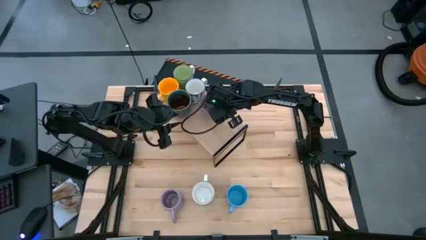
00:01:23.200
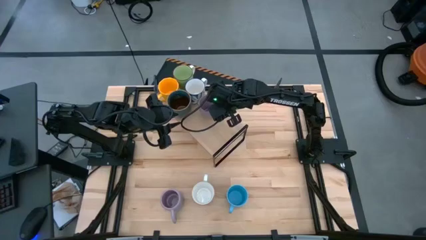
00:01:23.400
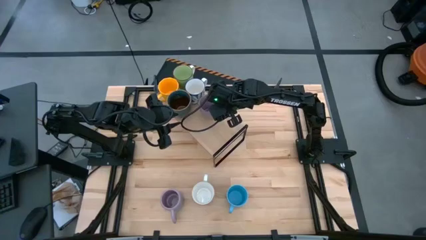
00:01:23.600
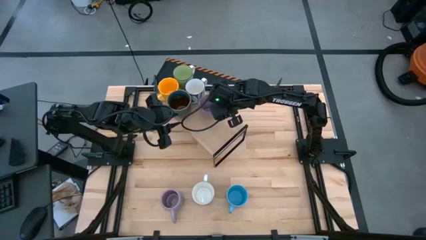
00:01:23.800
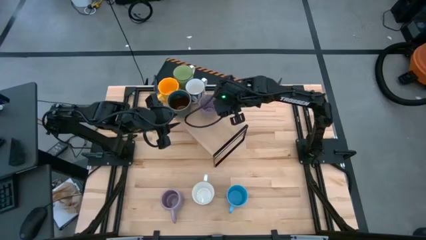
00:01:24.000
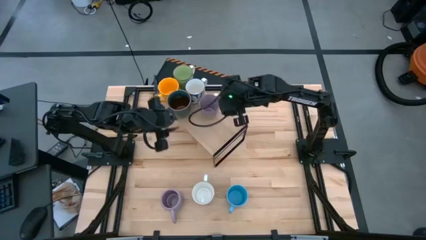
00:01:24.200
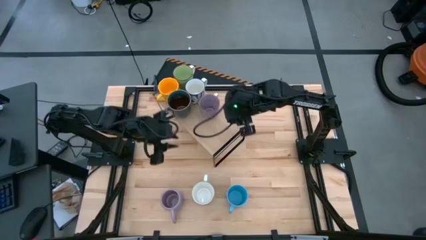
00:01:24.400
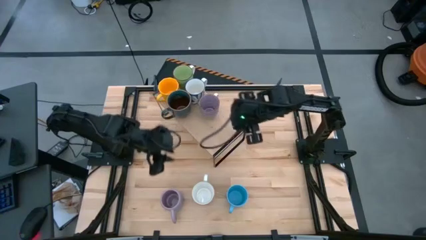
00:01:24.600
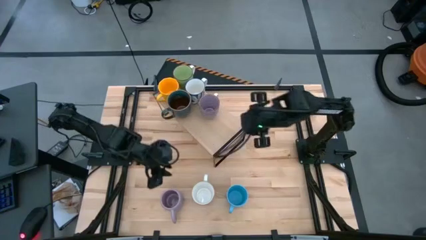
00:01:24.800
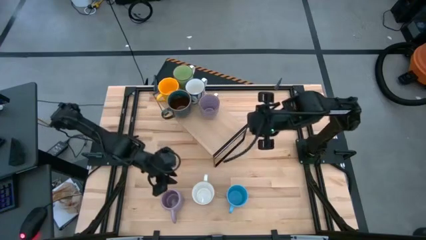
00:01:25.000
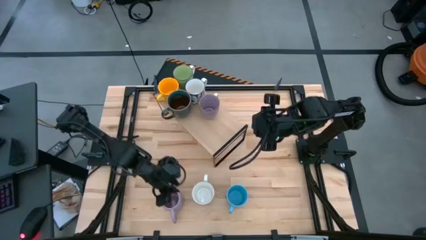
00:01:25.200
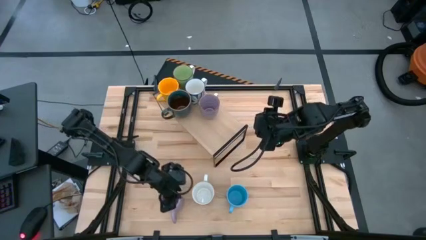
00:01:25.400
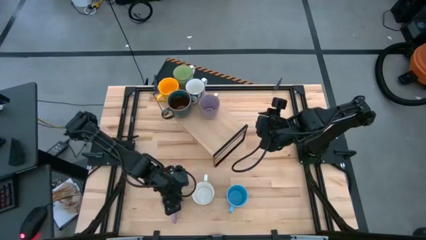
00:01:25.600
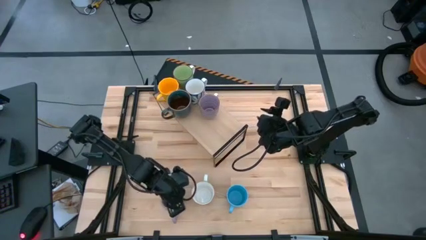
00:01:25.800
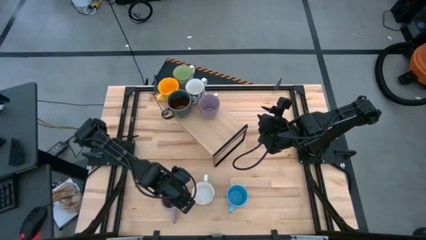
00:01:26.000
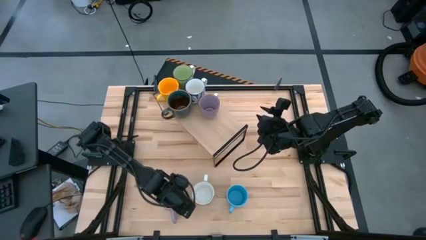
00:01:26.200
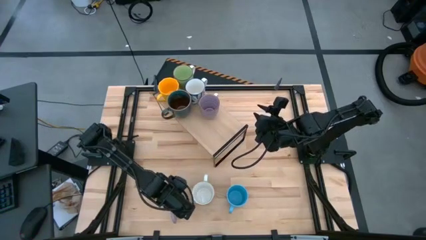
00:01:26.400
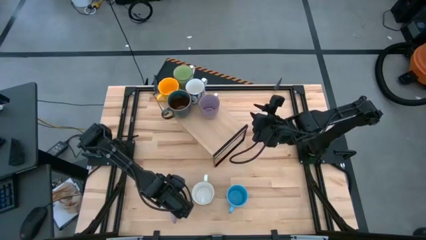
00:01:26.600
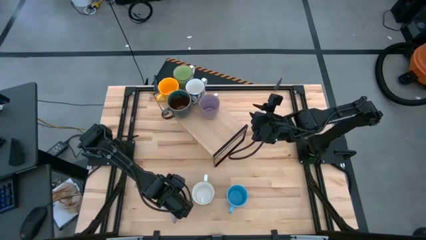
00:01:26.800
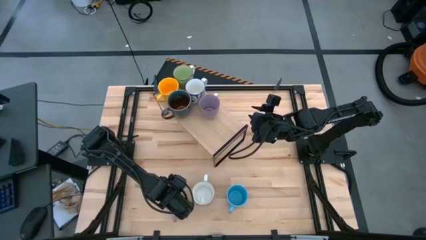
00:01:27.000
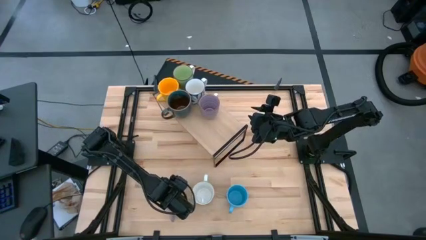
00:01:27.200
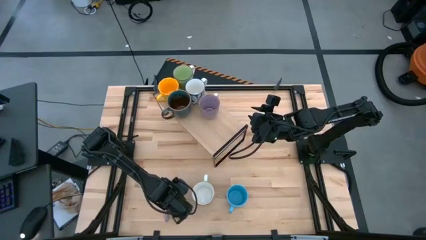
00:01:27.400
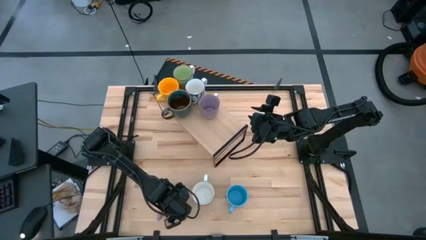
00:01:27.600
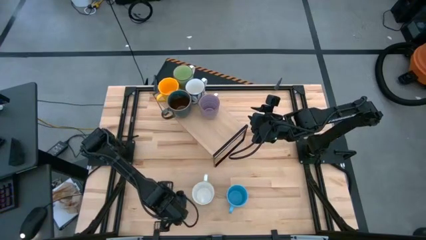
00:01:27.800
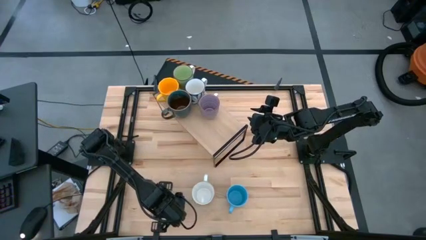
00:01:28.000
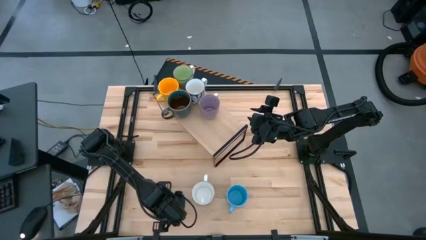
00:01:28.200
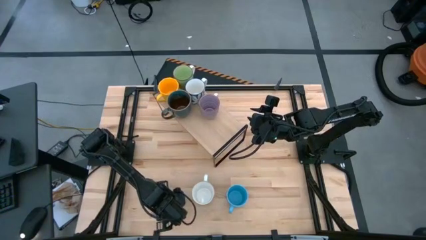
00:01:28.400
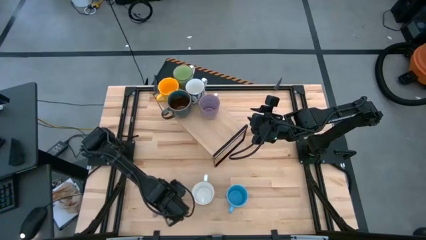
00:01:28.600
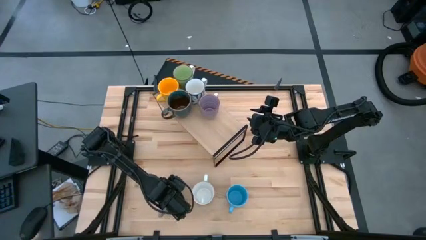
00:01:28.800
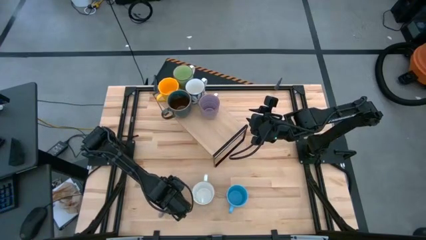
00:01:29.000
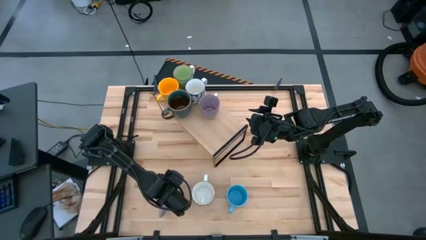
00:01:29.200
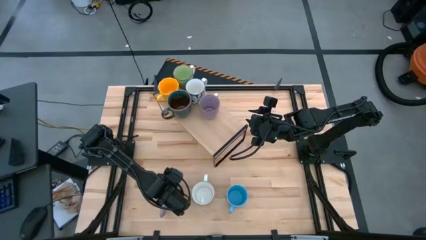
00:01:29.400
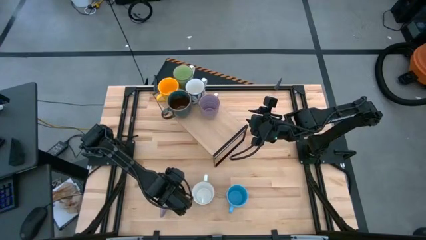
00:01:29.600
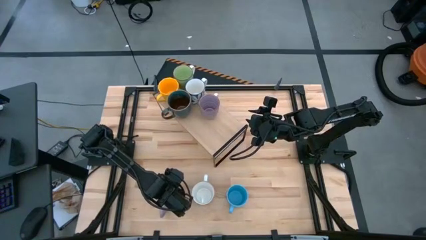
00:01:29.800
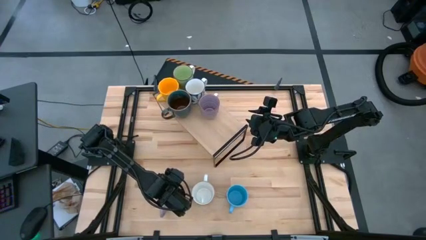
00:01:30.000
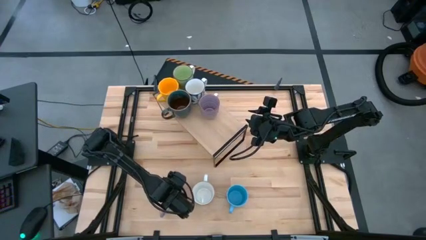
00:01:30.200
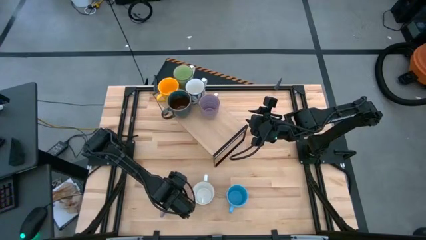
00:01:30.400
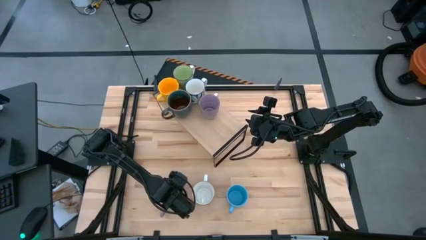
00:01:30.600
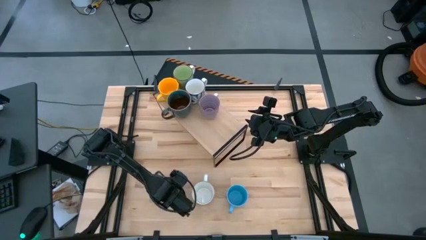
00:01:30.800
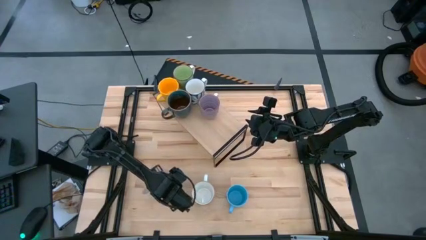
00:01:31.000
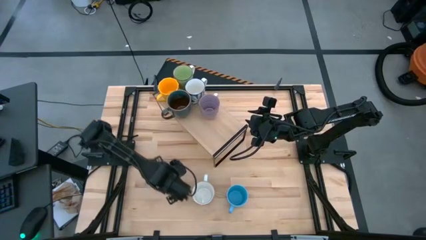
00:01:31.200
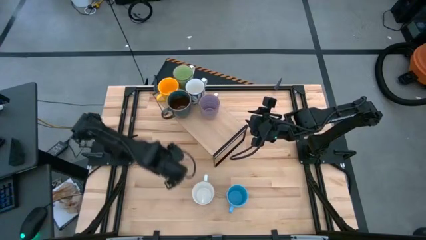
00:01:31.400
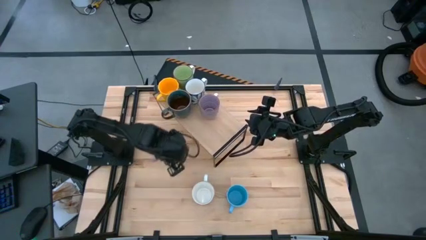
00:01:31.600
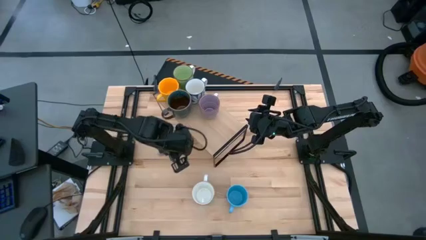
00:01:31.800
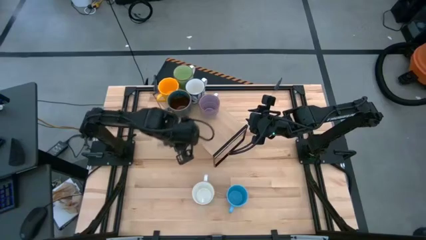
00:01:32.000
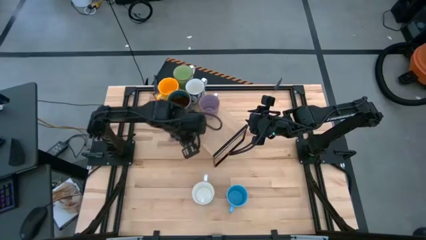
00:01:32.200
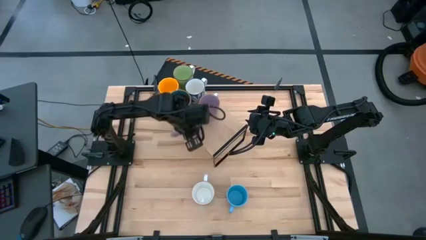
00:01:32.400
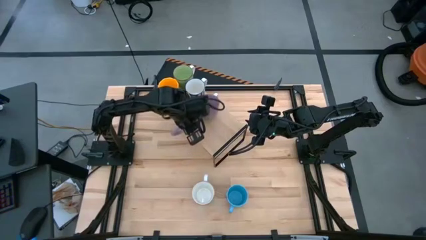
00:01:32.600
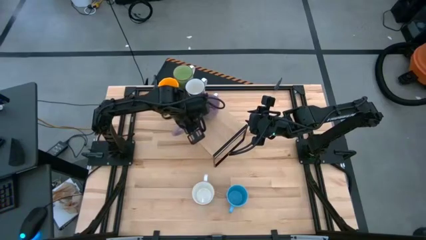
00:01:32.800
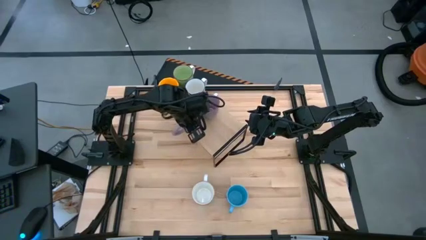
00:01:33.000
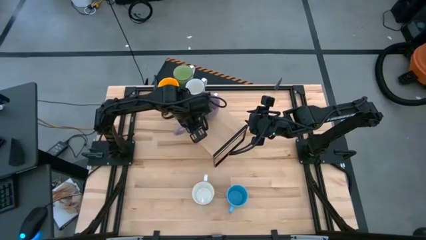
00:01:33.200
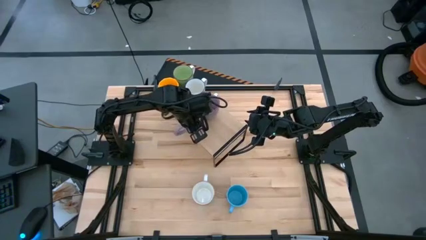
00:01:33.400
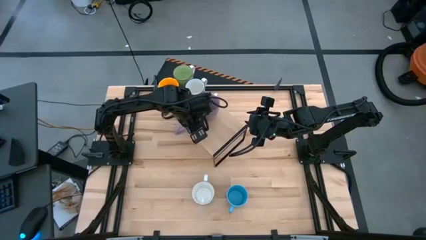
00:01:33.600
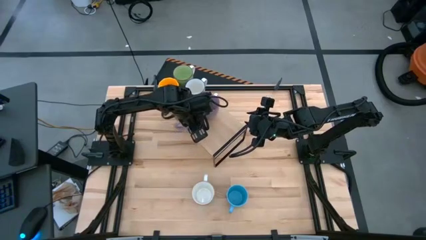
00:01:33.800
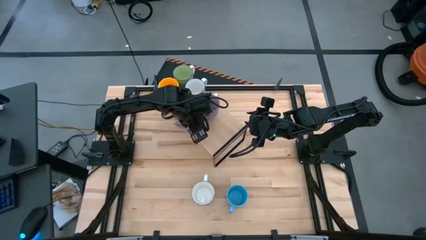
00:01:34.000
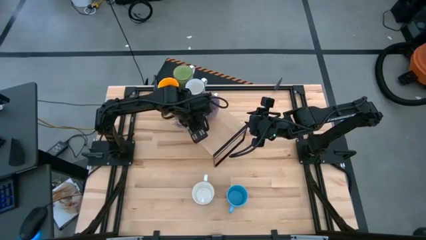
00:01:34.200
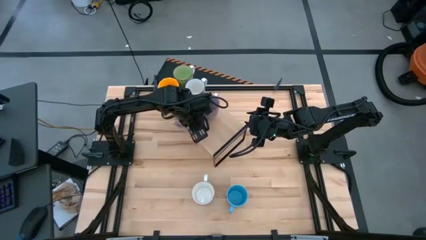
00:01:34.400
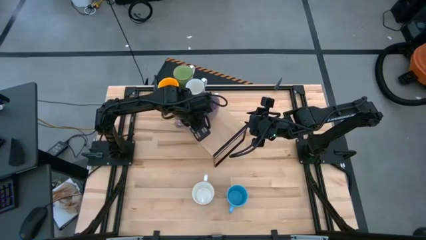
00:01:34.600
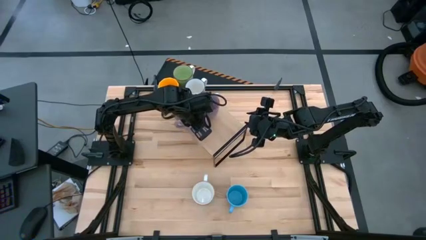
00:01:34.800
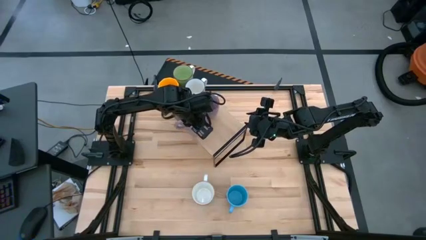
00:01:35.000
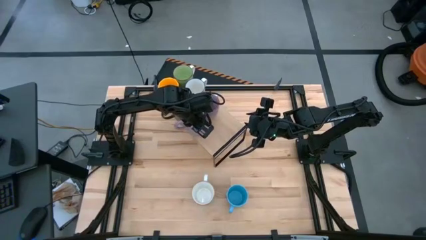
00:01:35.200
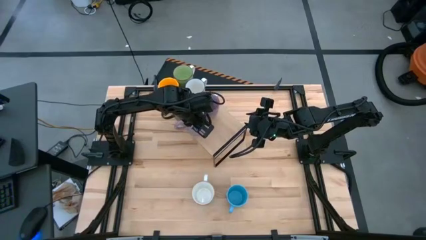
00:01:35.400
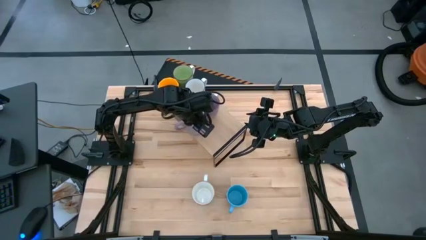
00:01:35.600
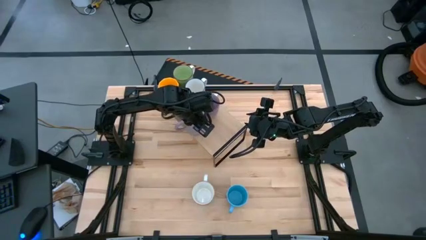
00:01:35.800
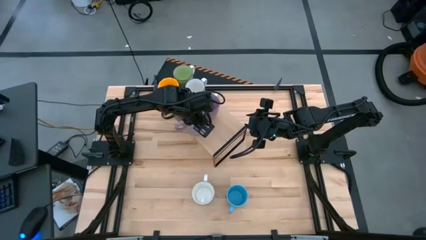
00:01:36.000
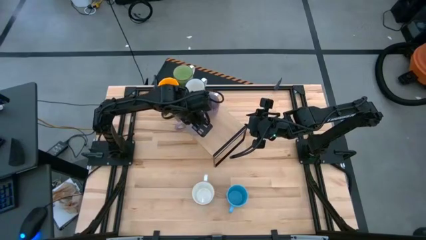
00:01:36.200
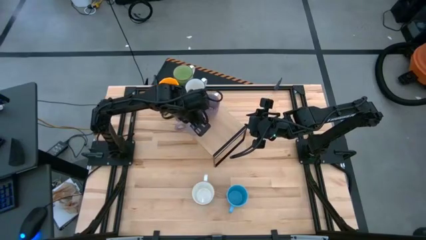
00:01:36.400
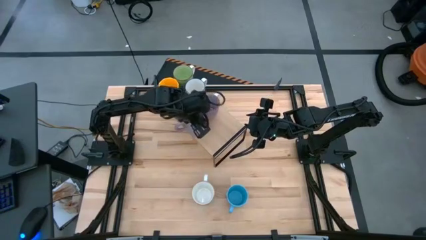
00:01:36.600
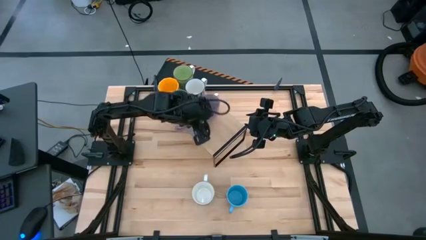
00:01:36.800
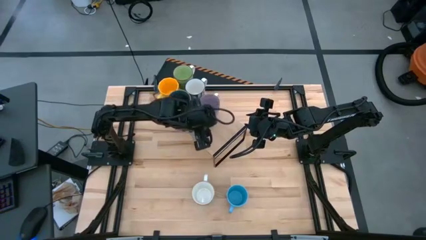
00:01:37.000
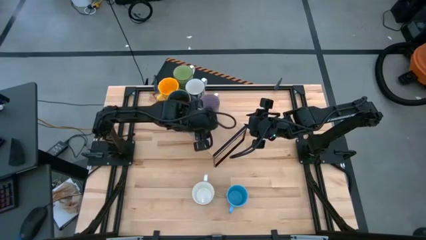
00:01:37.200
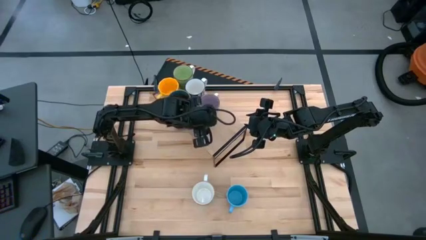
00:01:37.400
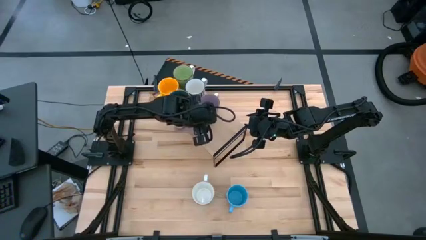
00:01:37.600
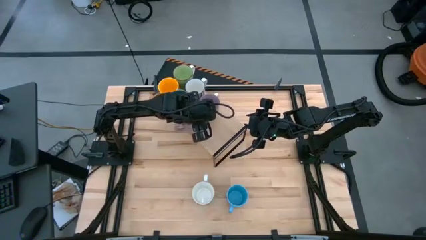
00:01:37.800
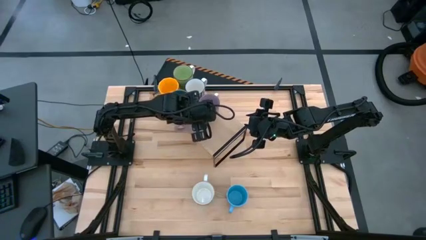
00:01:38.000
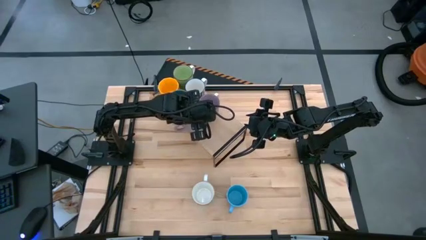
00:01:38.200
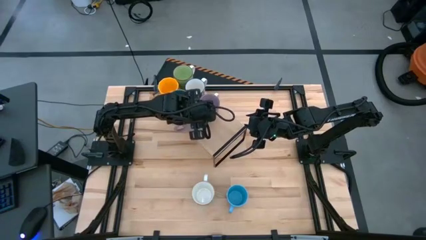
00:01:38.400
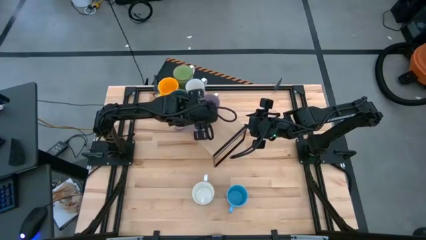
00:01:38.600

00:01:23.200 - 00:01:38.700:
Task: Place coffee mugs
Put the purple mug on the shelf

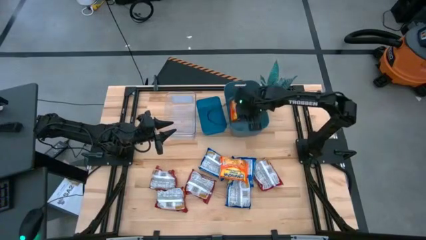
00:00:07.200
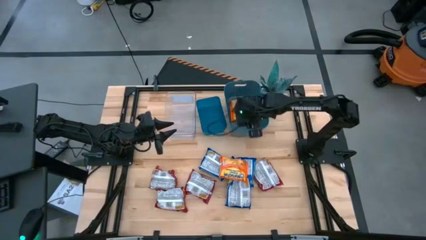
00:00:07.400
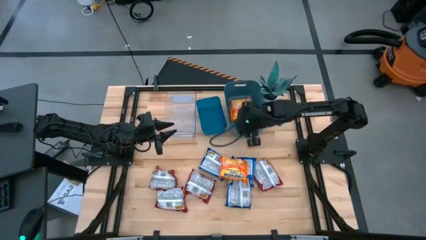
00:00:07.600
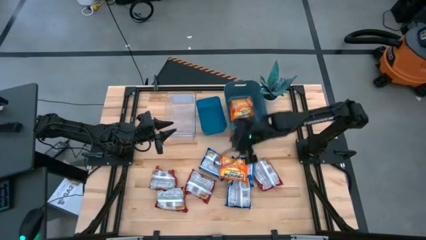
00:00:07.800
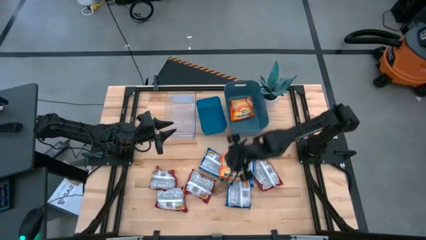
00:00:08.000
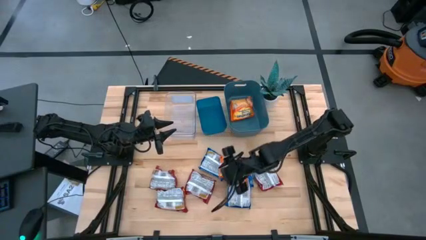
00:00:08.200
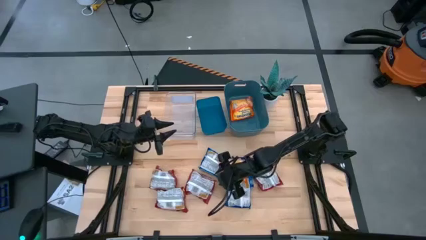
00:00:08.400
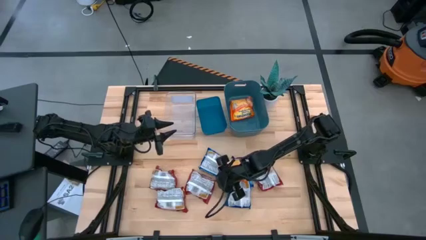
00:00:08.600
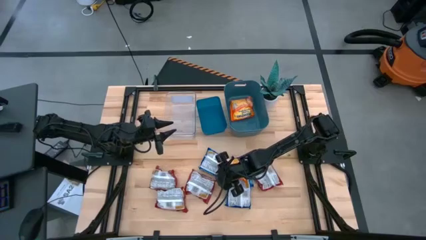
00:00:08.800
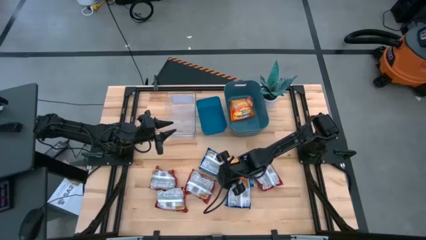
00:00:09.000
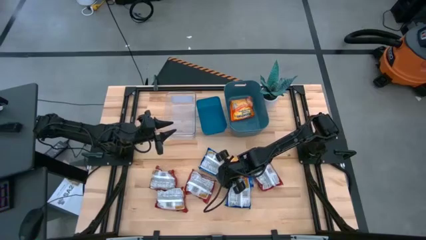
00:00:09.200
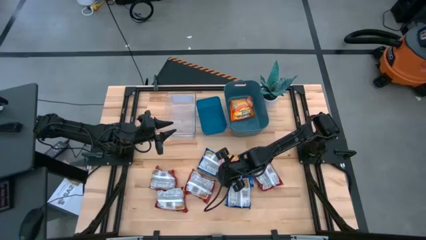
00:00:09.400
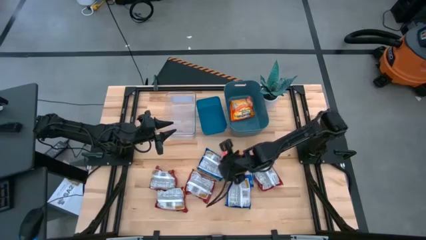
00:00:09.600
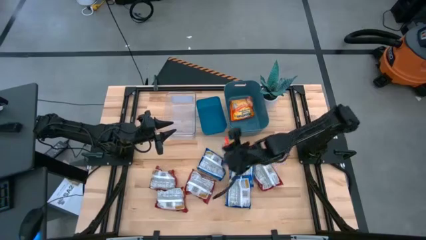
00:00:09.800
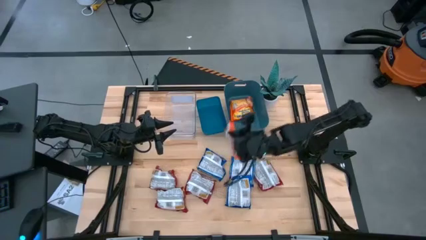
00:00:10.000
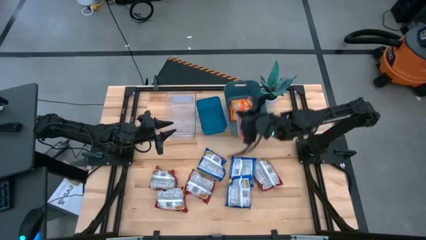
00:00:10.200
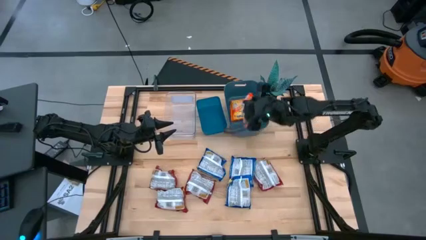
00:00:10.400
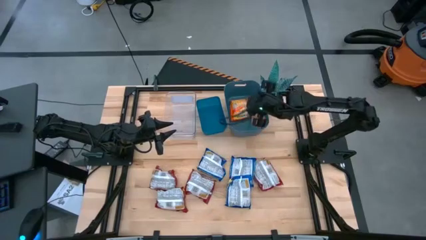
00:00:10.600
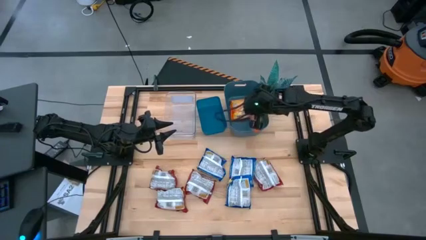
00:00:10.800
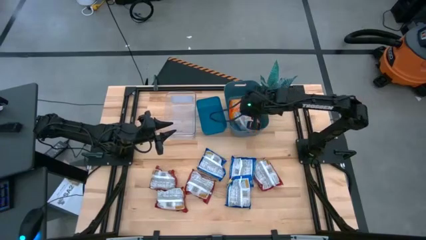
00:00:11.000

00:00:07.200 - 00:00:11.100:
Task: Sort Maruchan noodles
Put the orange noodle pack into the green bin
